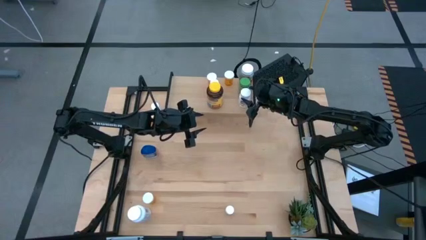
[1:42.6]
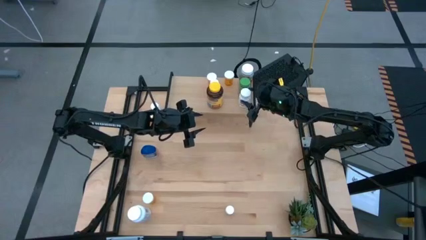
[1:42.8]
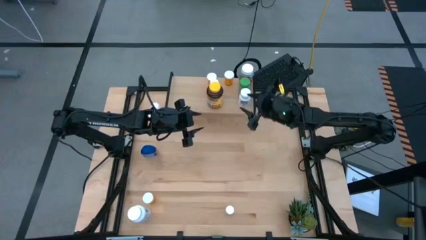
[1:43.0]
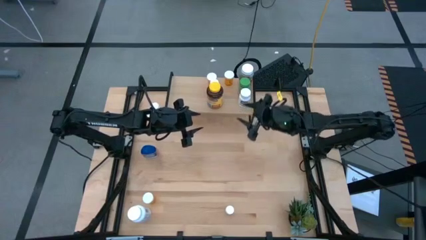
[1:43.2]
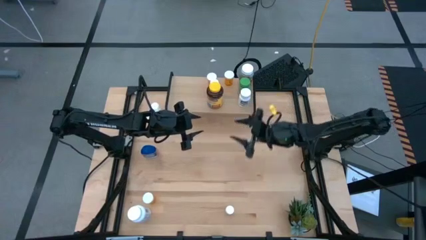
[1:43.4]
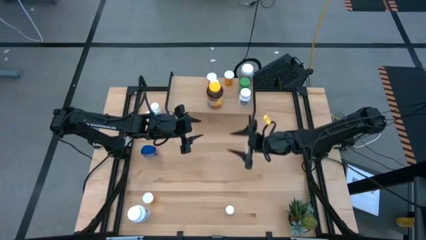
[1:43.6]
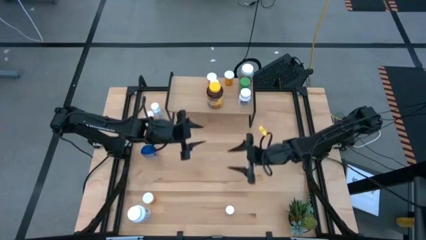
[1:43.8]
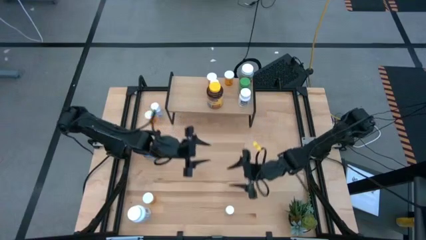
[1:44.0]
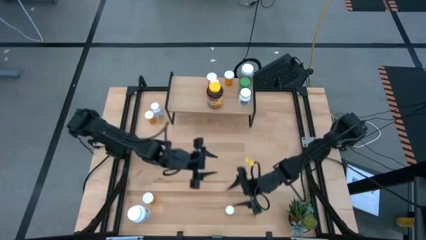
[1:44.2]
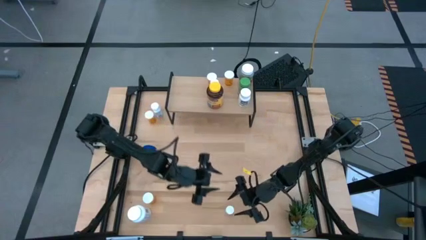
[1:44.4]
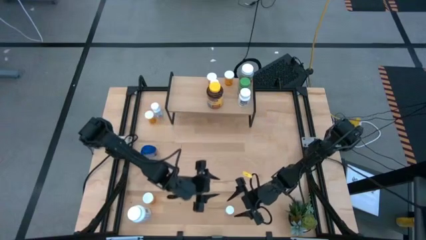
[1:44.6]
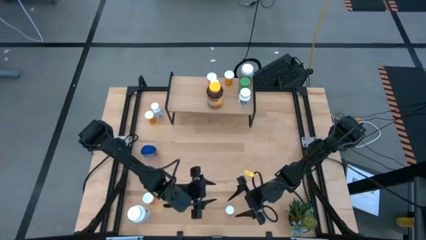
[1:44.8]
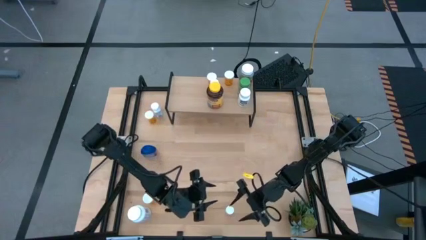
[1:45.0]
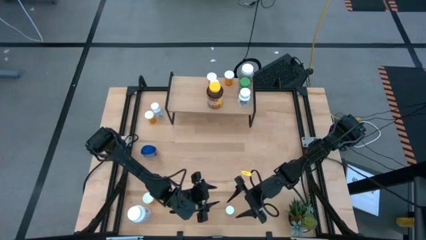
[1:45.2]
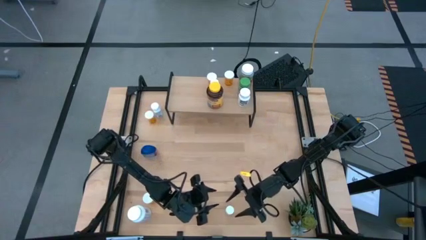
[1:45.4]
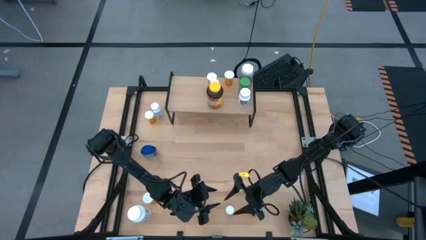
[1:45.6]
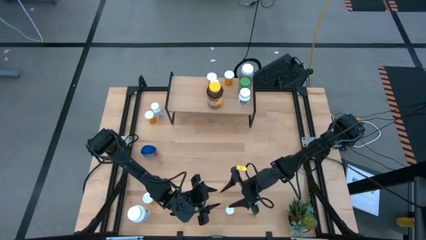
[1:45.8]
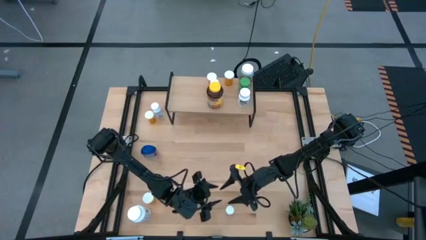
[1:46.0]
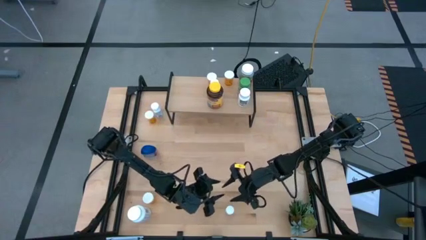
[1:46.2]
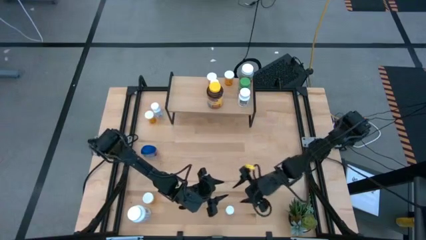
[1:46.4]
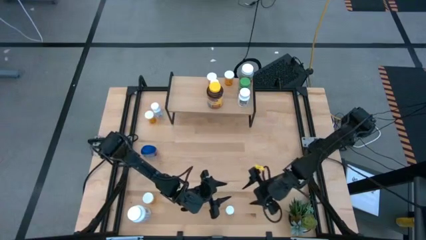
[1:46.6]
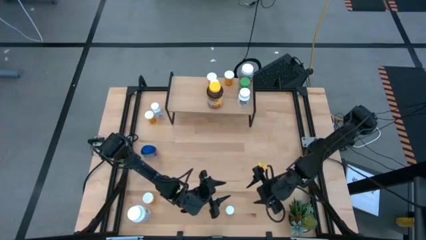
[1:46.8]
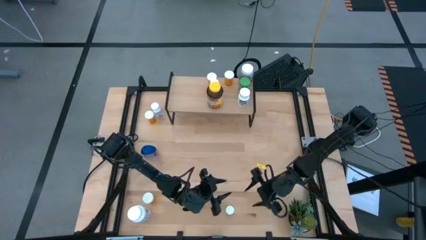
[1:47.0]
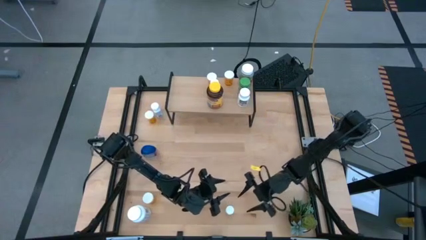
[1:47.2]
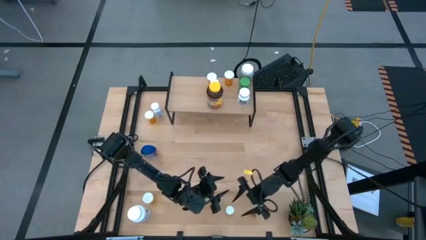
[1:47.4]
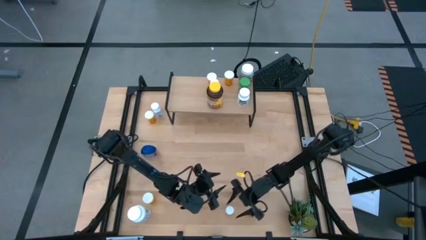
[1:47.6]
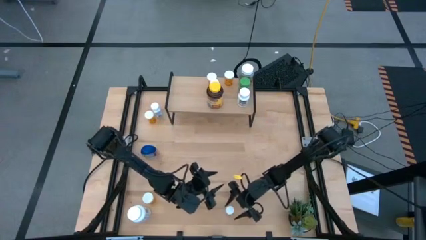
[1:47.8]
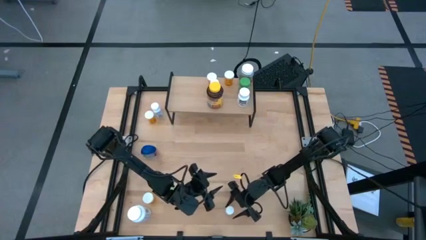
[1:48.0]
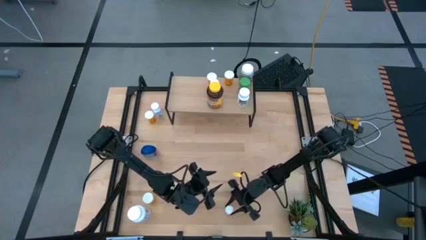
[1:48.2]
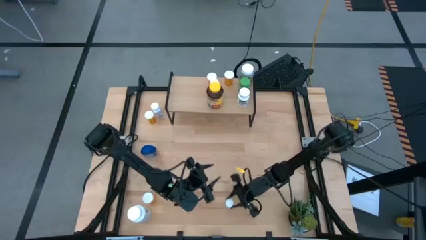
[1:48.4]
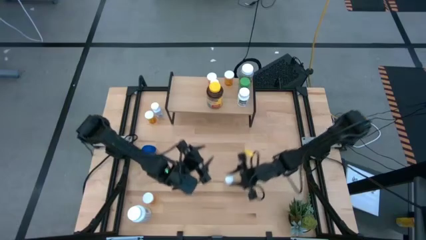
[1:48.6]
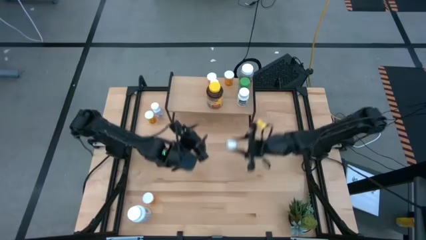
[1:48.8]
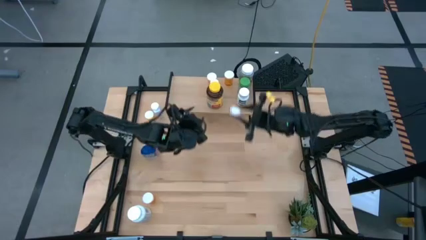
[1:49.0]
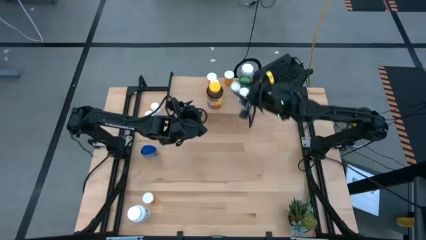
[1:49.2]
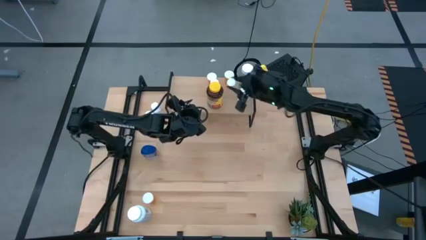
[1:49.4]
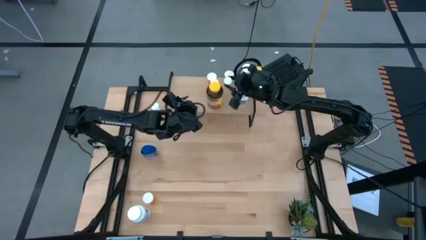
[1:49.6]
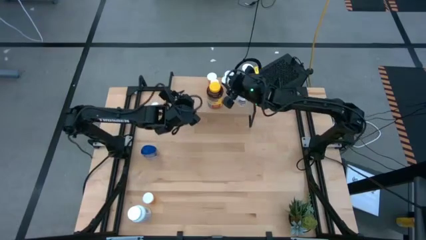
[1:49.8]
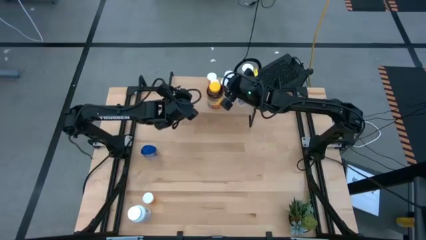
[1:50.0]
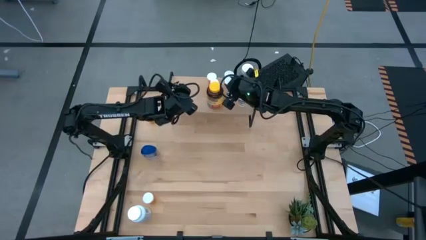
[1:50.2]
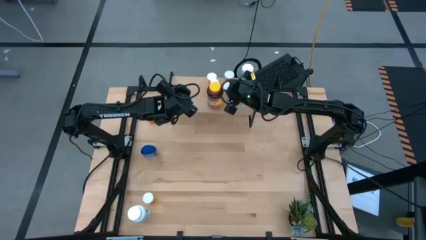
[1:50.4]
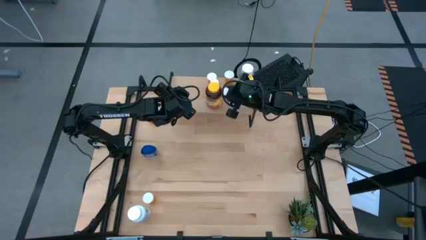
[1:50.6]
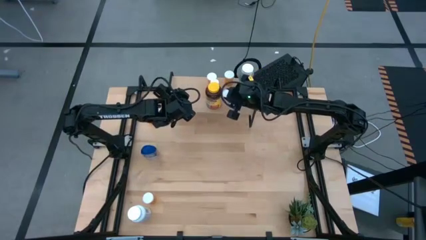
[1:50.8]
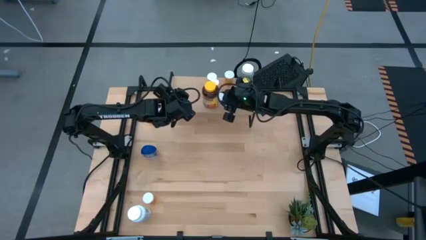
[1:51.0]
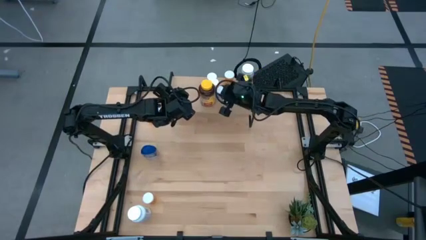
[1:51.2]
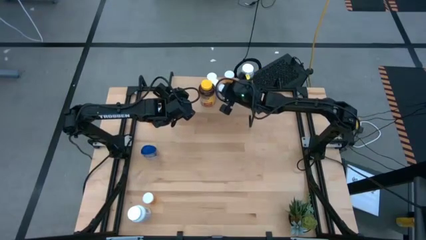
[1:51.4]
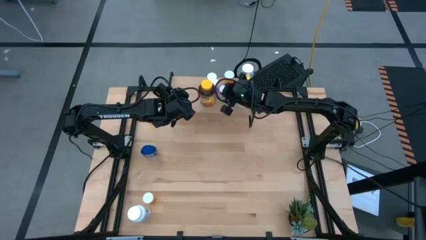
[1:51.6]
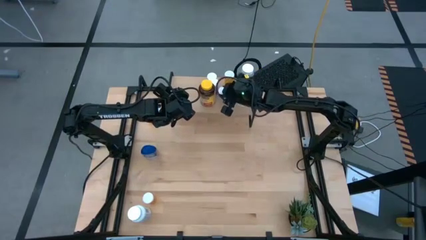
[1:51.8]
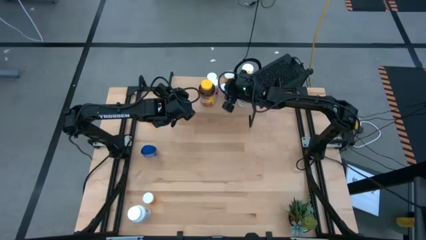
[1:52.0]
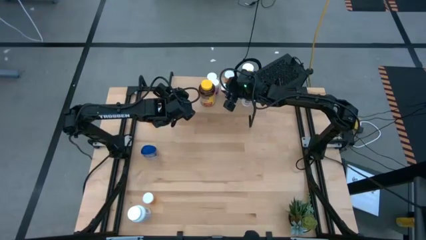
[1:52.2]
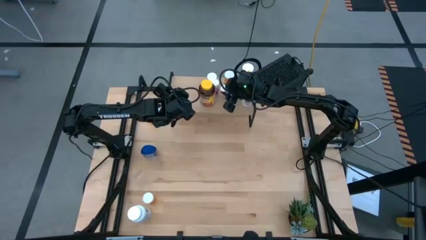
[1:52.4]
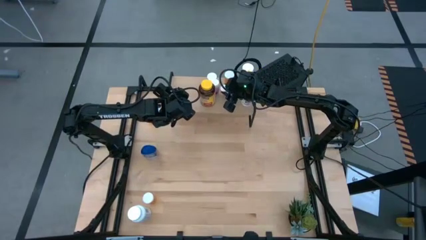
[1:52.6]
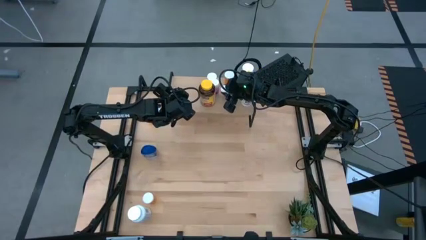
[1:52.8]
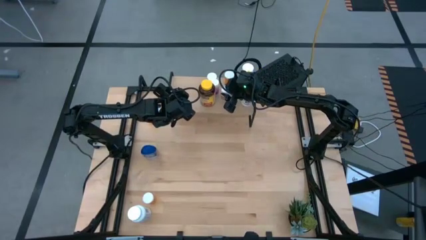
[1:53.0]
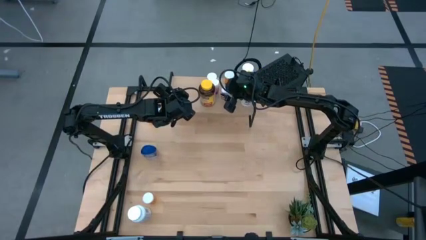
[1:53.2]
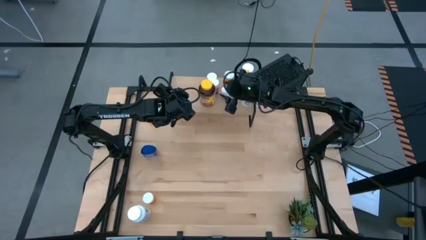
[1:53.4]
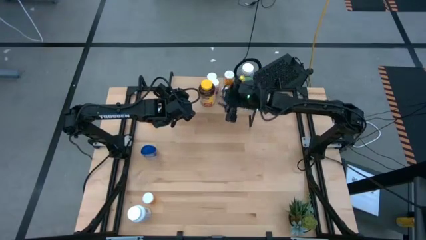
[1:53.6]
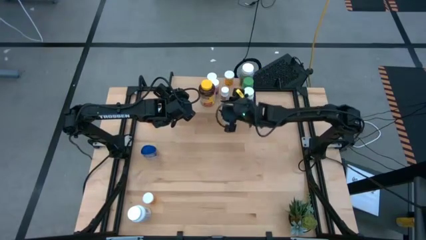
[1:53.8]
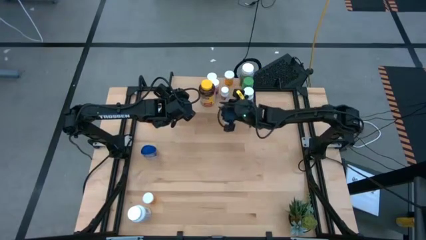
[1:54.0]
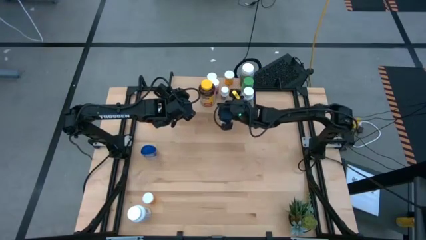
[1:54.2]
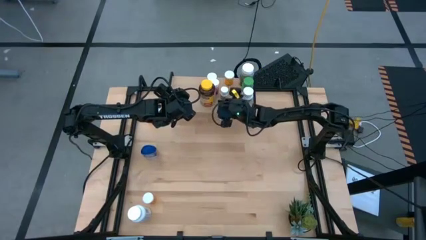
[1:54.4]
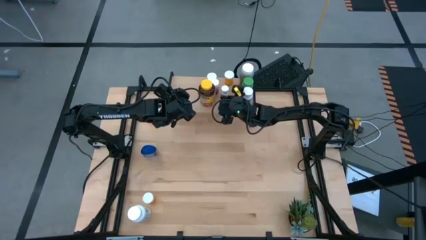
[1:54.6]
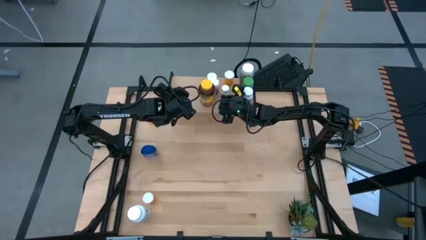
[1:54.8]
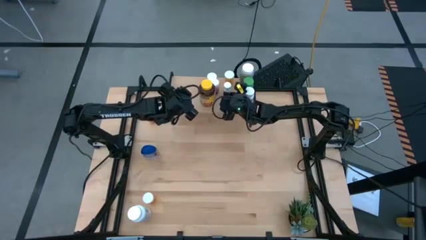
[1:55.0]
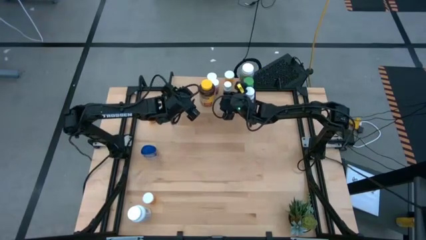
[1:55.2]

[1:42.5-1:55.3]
Task: Pick and place medicine bottles onto shelf by color
Put the white and black pill bottle on the shelf

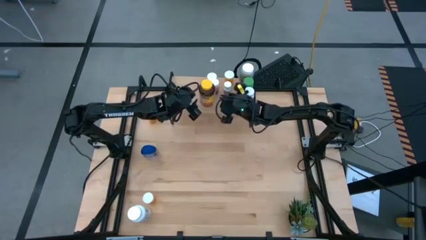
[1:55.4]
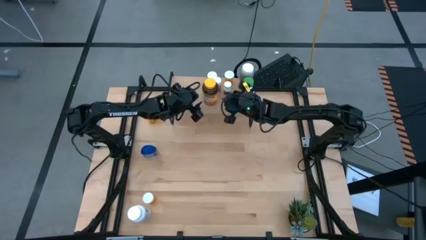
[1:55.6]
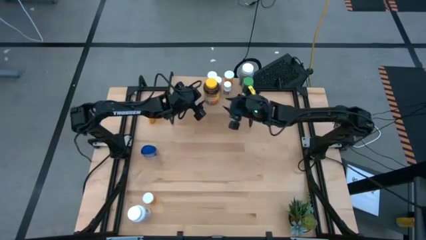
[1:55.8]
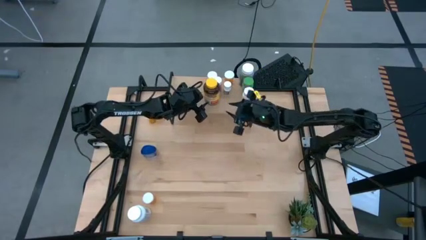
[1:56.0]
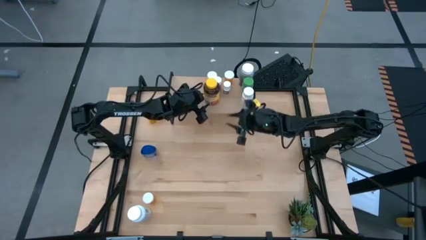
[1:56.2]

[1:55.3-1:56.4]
Adjust the yellow pill bottle on the shelf
